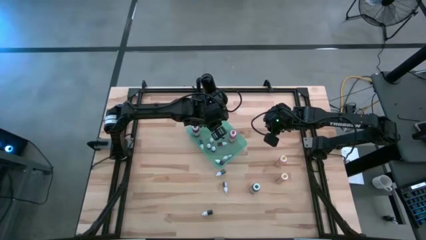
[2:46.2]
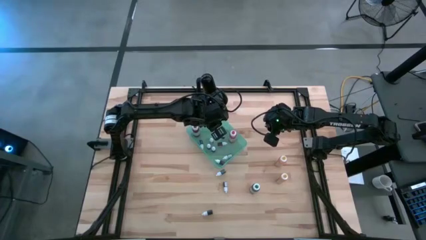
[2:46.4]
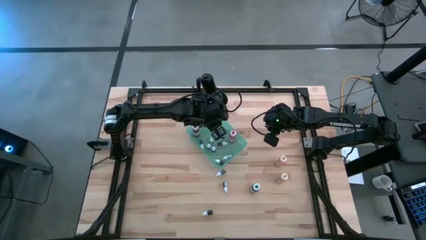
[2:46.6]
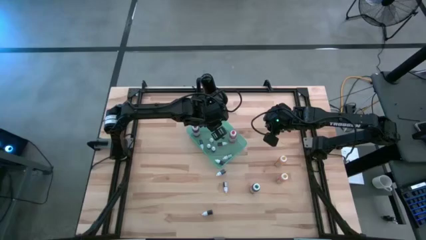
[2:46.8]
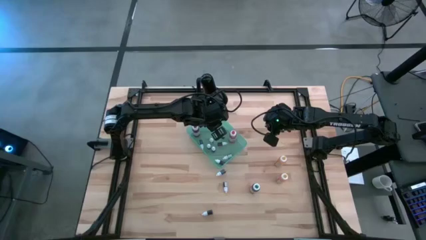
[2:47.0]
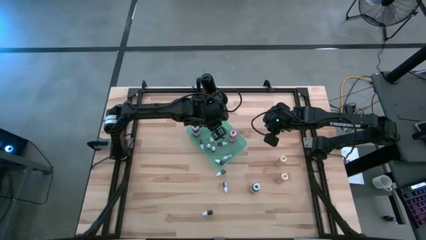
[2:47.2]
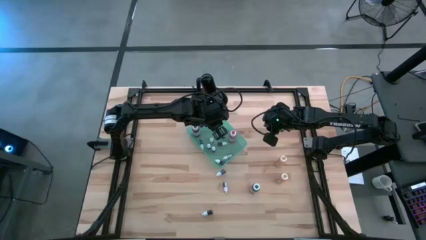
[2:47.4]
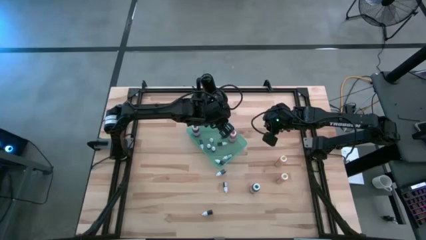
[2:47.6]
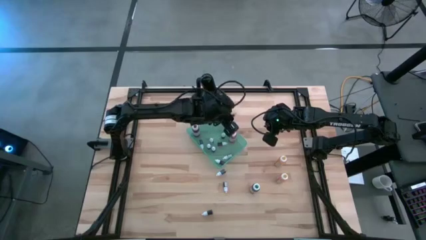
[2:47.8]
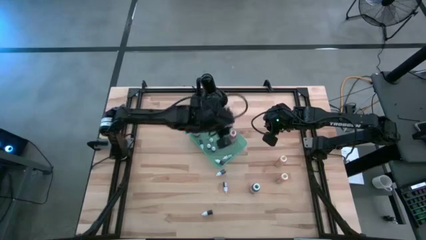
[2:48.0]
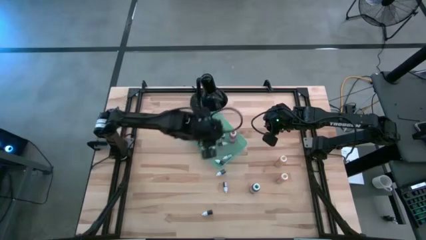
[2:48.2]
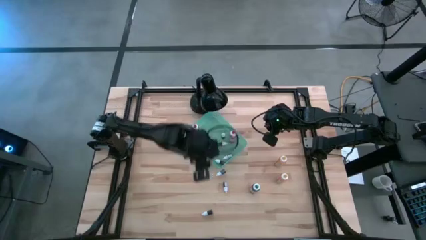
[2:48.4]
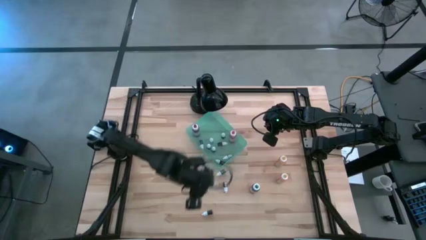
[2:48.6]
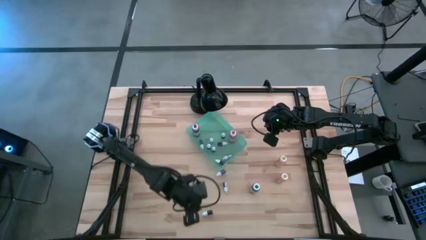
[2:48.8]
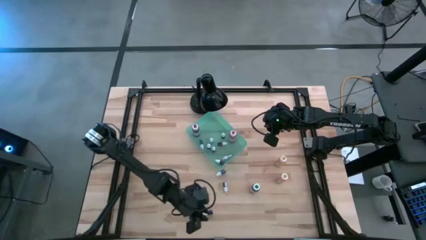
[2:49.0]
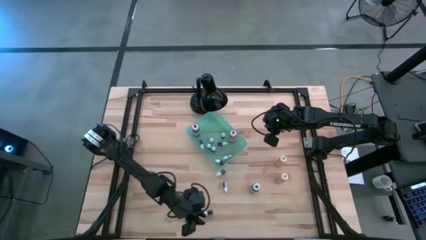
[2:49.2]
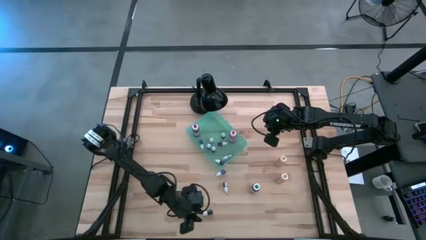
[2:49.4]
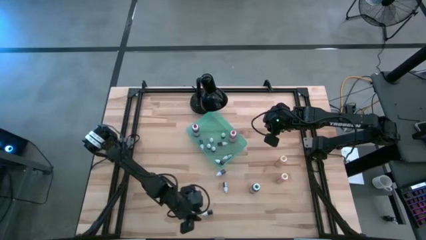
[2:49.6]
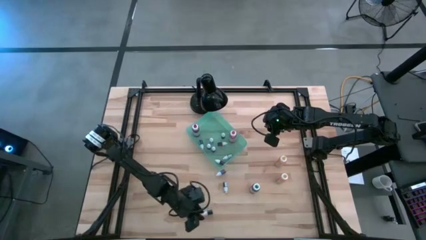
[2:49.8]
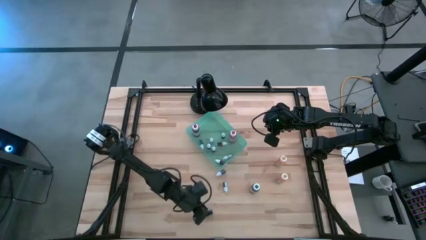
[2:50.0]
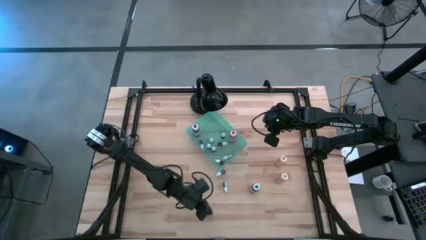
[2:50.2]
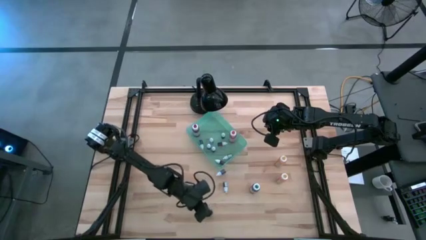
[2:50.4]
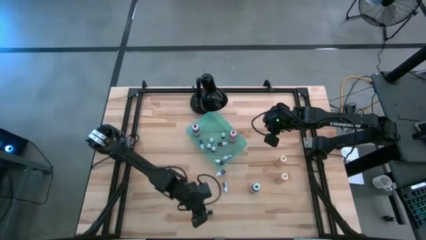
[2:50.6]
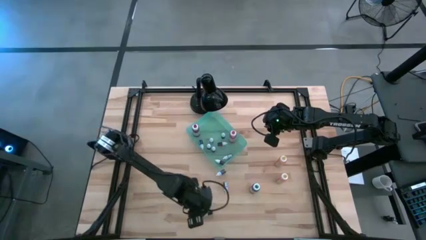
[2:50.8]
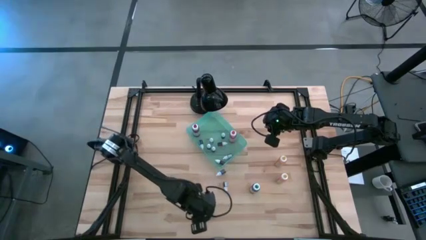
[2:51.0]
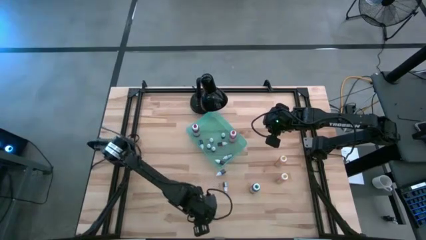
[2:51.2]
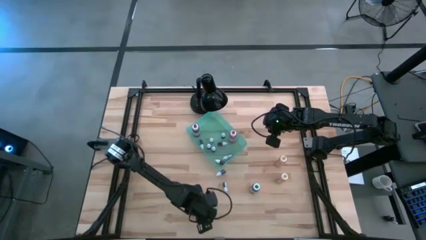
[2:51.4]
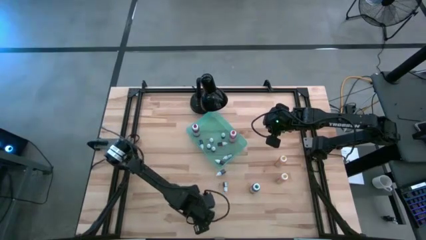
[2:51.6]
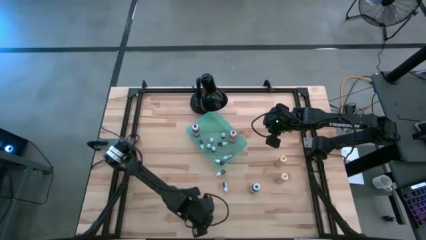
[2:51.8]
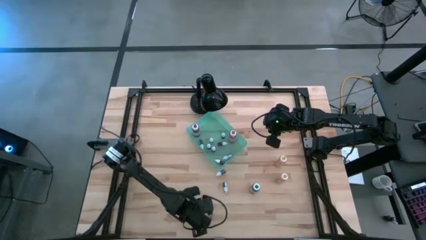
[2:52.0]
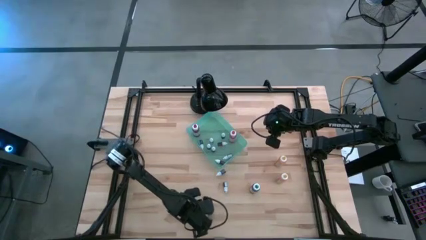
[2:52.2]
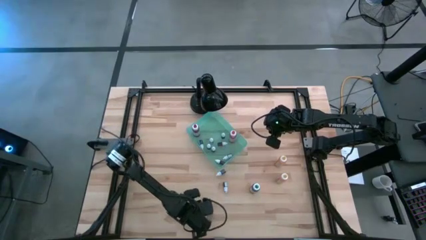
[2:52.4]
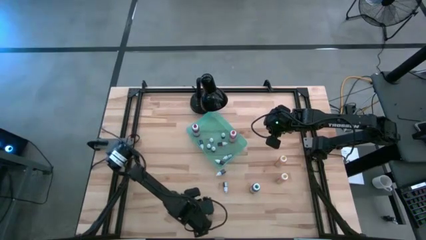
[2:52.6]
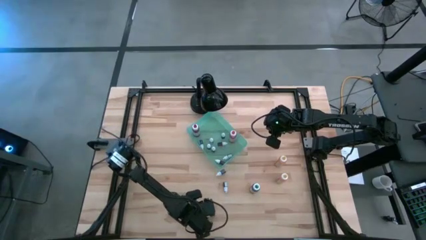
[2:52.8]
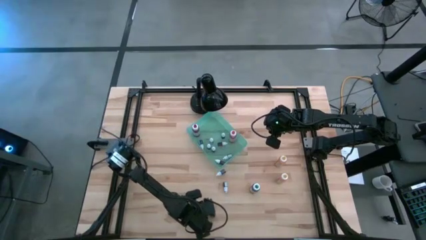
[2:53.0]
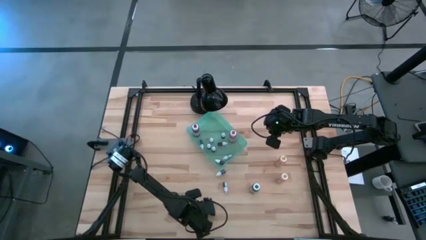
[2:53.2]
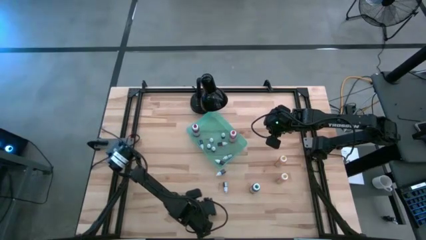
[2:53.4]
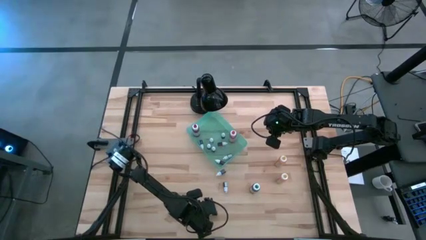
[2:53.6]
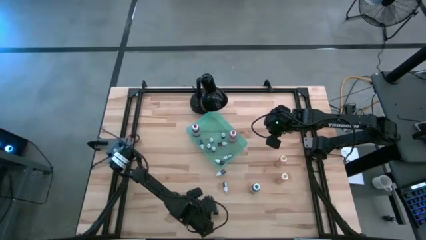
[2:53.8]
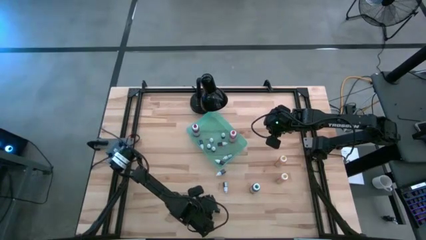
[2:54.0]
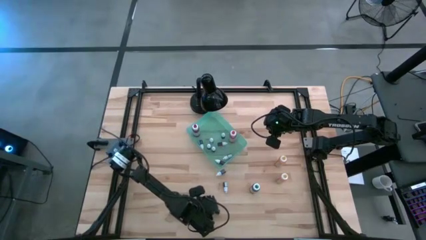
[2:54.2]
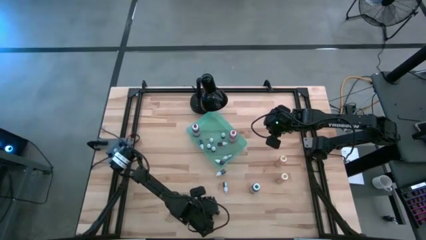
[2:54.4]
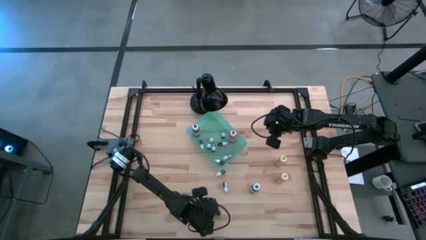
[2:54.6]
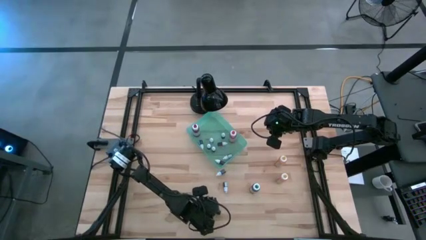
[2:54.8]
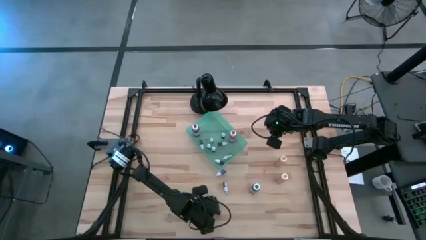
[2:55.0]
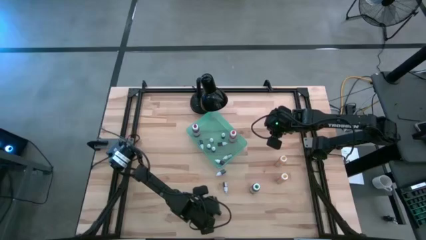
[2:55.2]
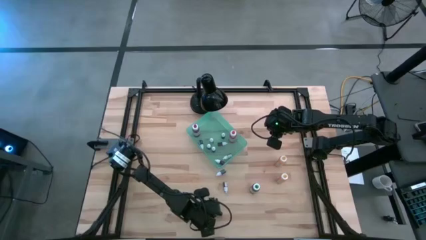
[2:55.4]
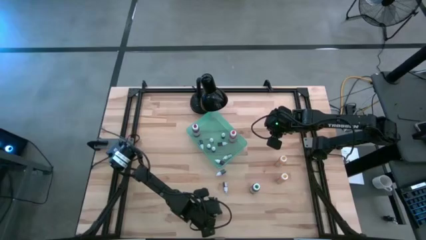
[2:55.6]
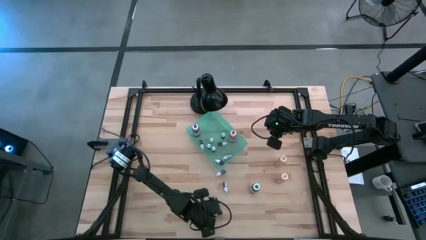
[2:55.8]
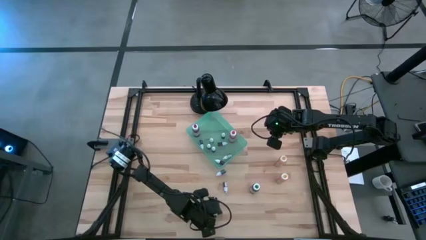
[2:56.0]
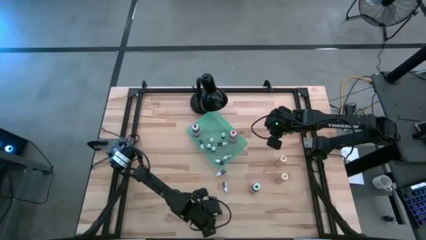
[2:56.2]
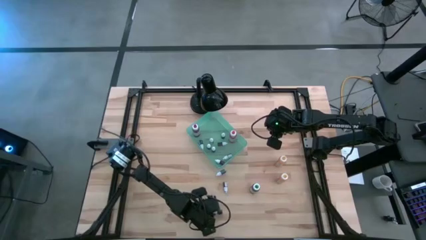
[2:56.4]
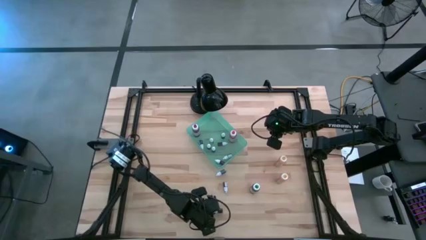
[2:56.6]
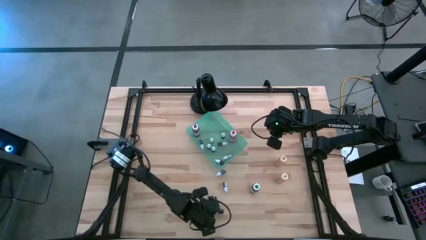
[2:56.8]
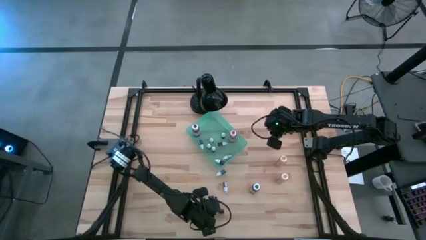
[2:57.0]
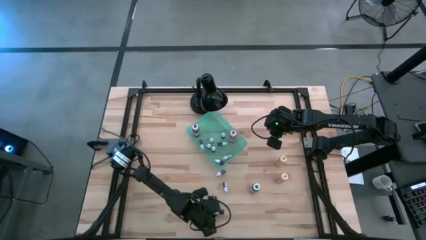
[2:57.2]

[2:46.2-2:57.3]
Task: Pick & Place food coloring
Put the small black food coloring bottle into the green bin

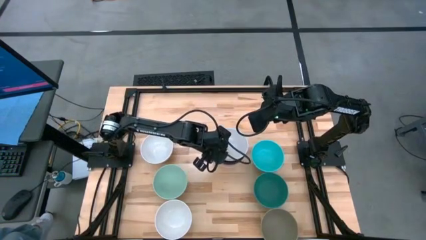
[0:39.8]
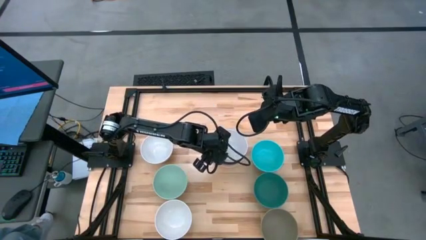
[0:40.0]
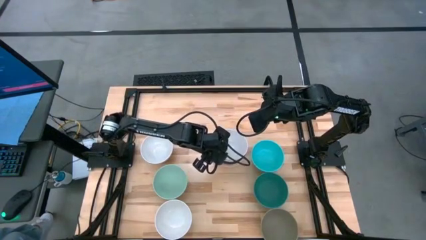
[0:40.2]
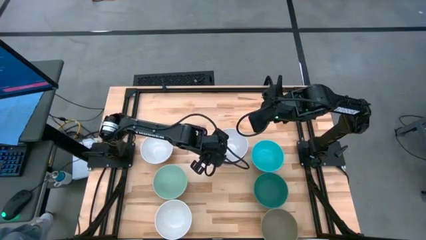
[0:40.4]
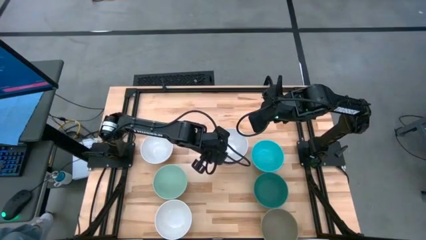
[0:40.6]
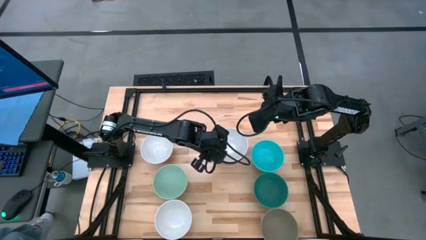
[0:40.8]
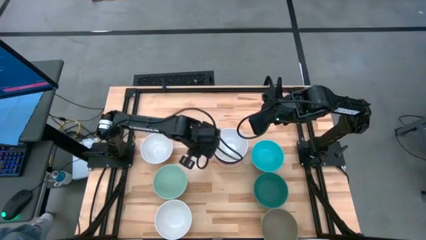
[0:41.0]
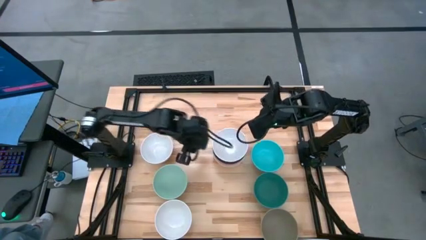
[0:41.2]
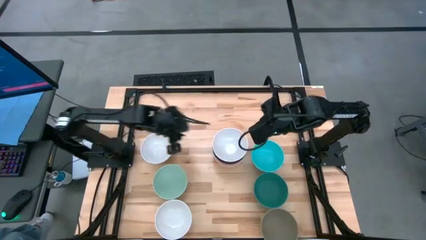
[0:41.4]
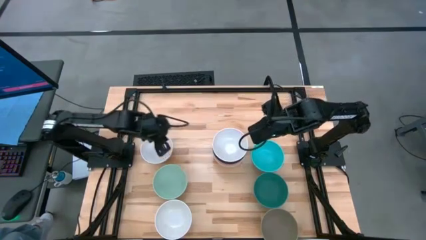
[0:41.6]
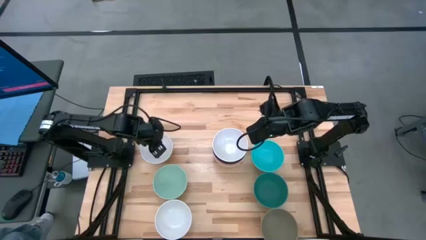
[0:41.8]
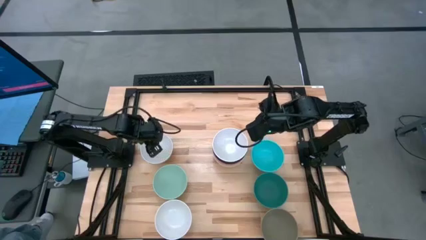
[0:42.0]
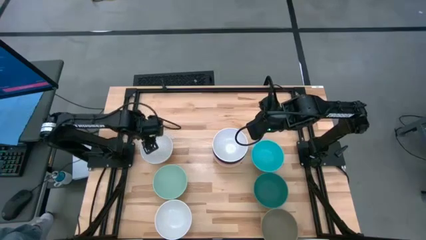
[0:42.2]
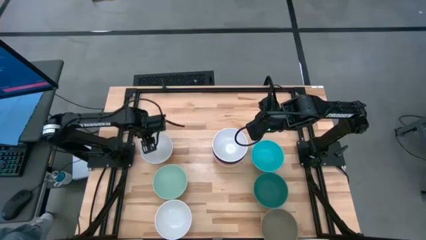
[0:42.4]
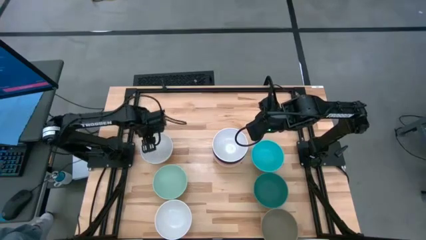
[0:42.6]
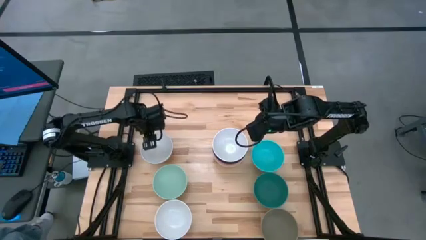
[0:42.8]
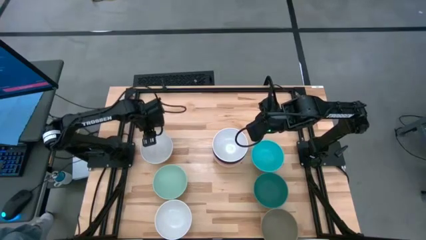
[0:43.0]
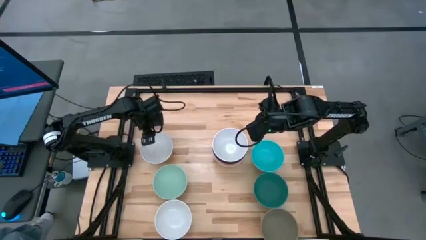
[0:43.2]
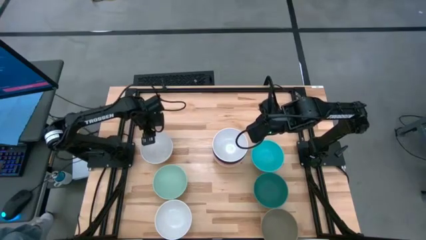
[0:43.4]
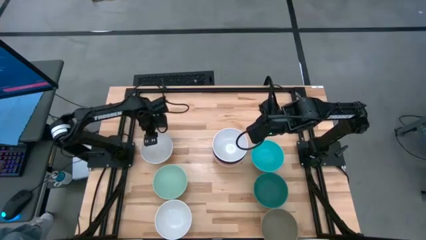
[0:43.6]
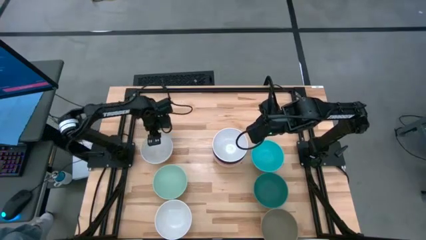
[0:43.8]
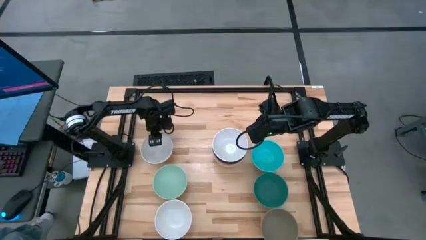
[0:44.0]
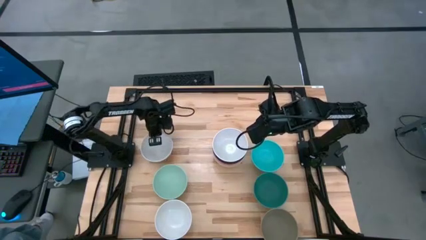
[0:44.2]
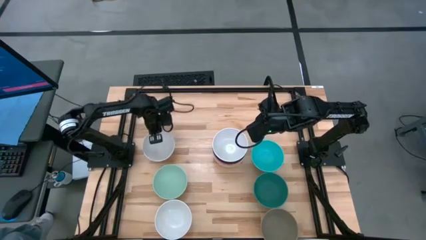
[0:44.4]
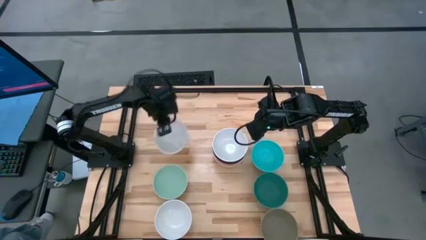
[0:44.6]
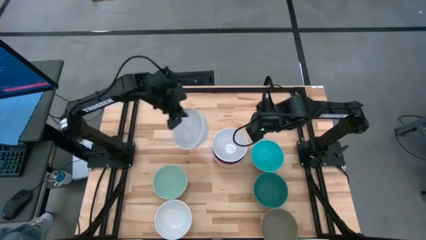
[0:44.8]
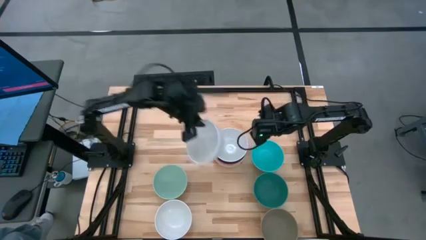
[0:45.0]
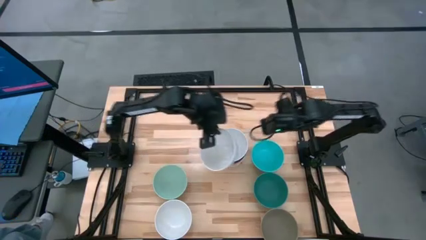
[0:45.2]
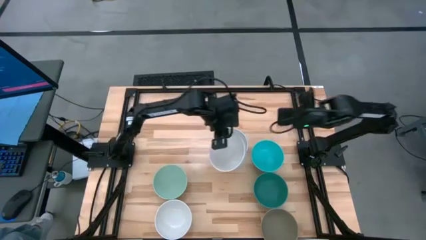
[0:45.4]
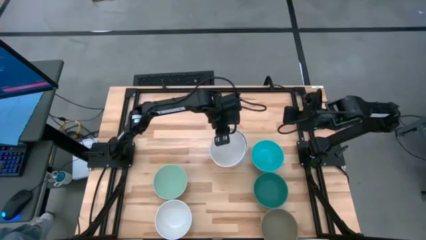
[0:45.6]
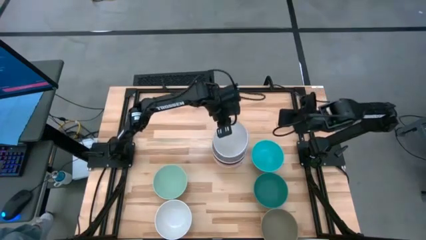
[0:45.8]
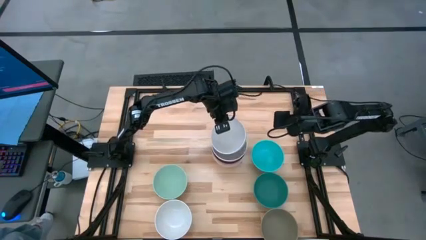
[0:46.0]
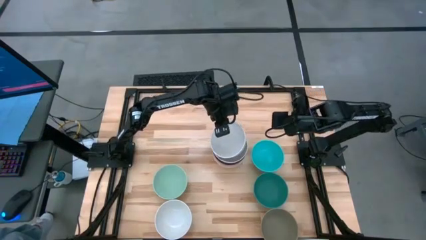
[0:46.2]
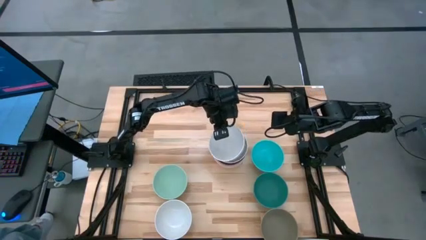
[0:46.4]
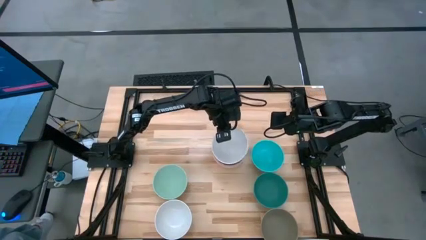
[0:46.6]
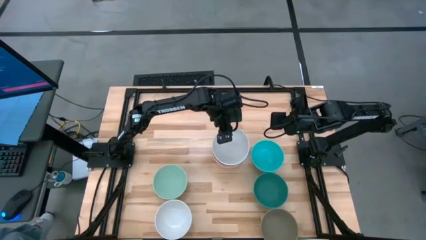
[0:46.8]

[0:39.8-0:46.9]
Task: Nest bowls inside each other
Stack the white bowl on the white bowl
